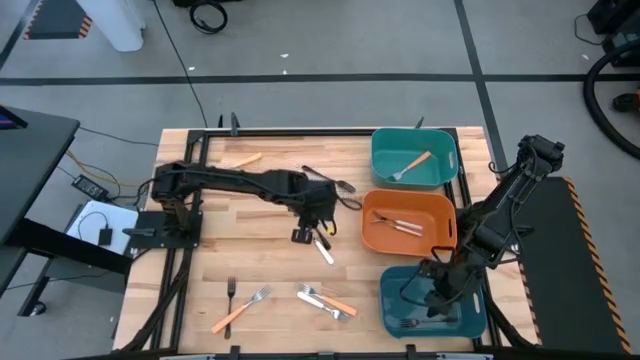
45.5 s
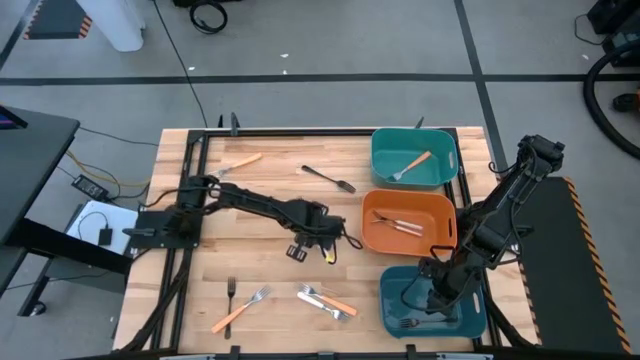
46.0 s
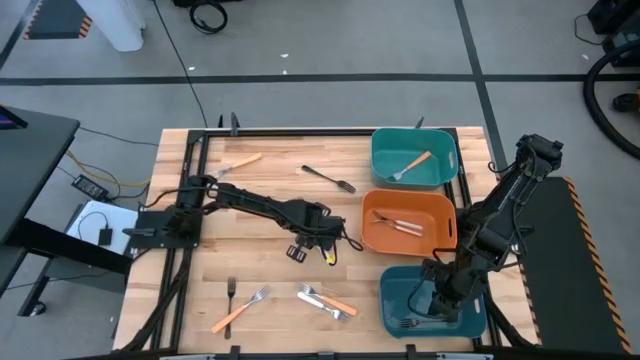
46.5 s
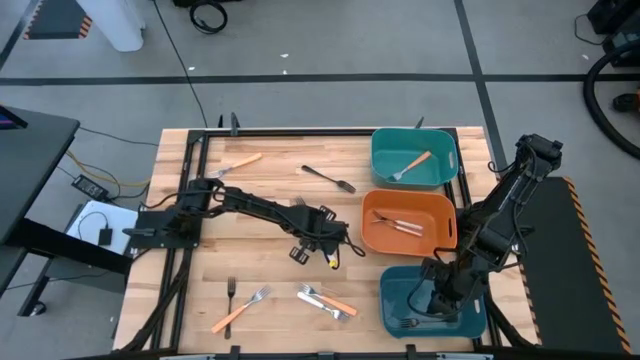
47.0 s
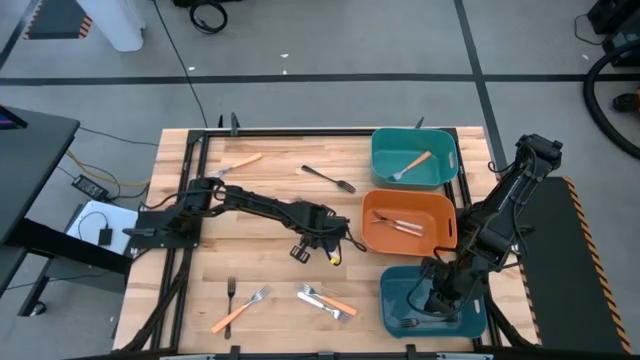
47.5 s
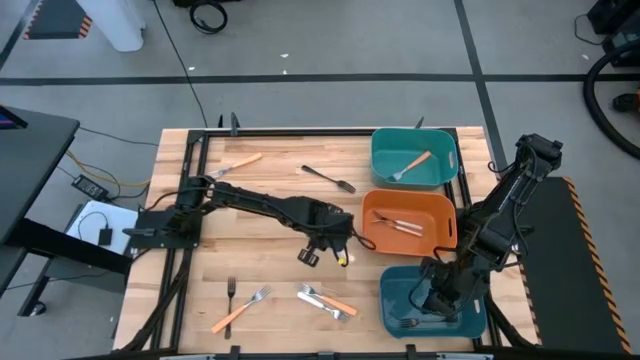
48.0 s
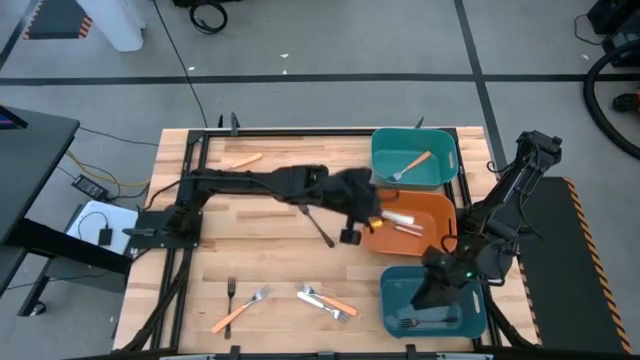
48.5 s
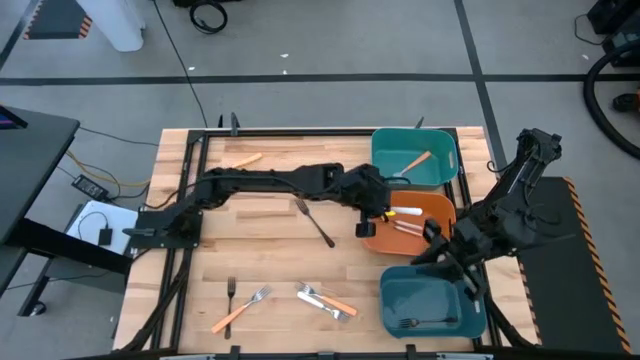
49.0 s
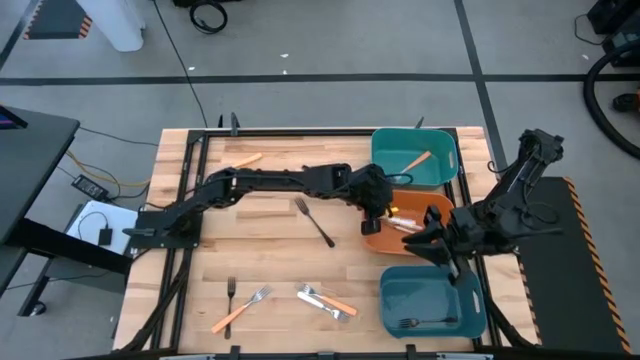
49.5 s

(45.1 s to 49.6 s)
Task: Sort silverware by color (type)
Put the white fork into the orange bin

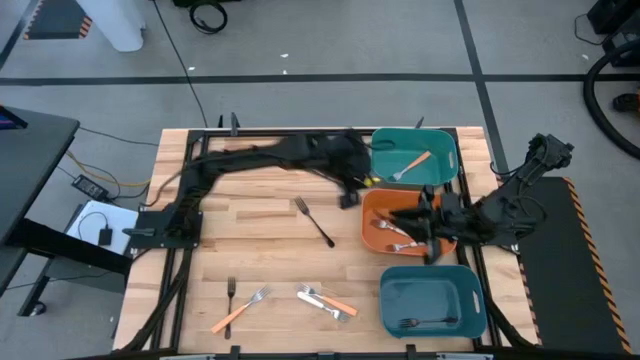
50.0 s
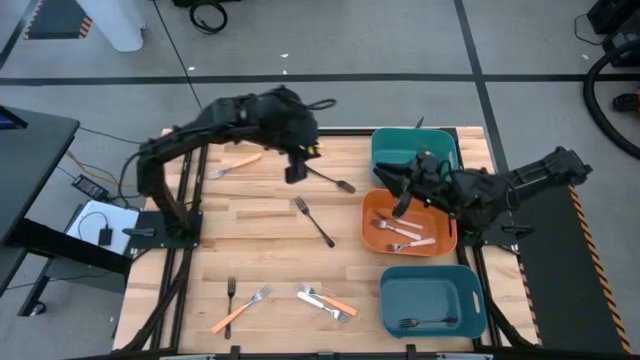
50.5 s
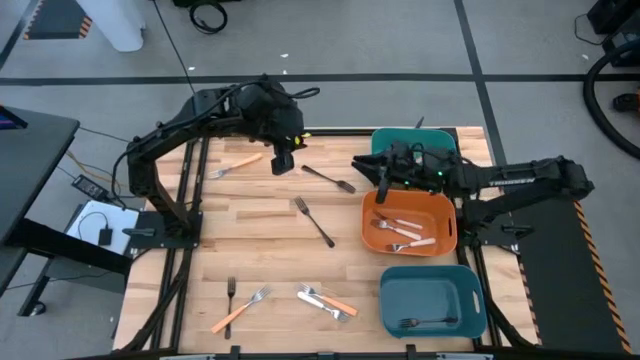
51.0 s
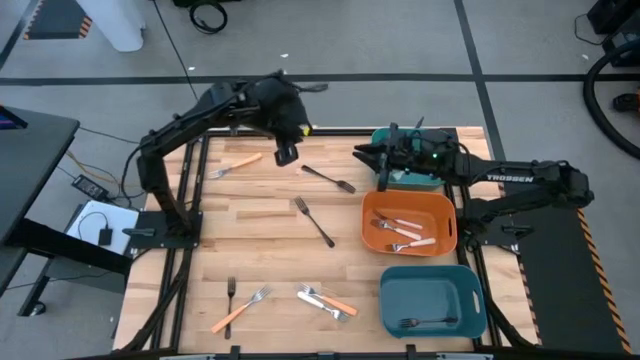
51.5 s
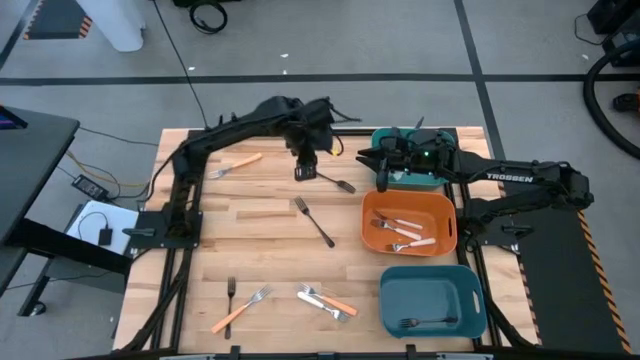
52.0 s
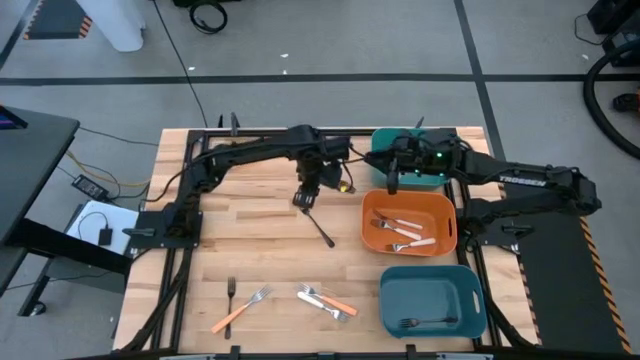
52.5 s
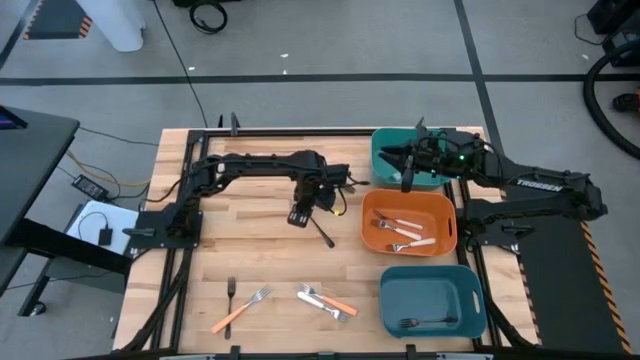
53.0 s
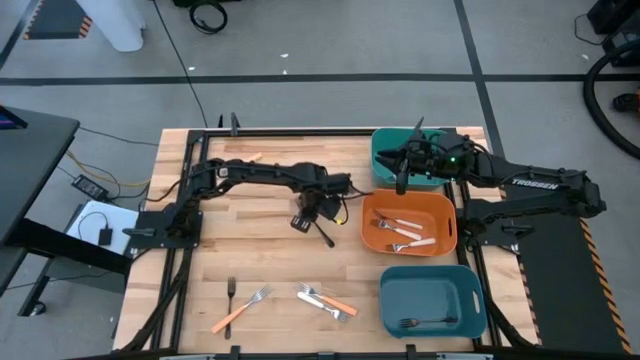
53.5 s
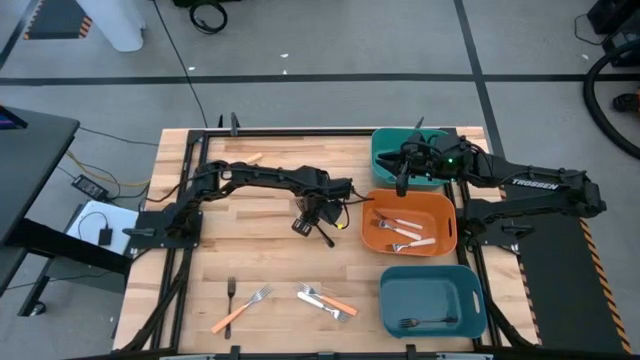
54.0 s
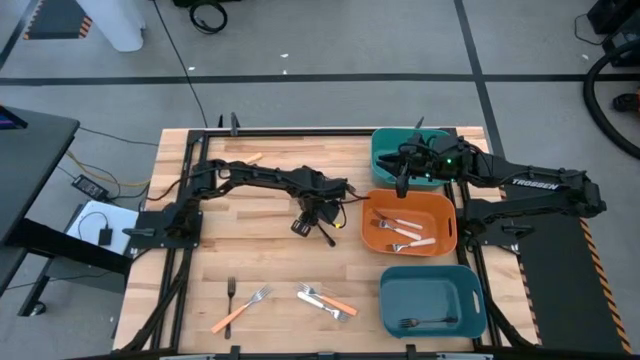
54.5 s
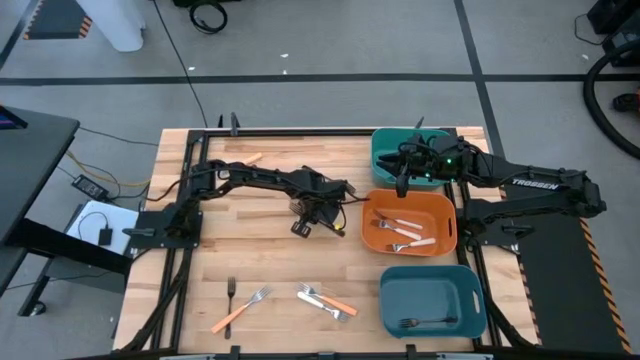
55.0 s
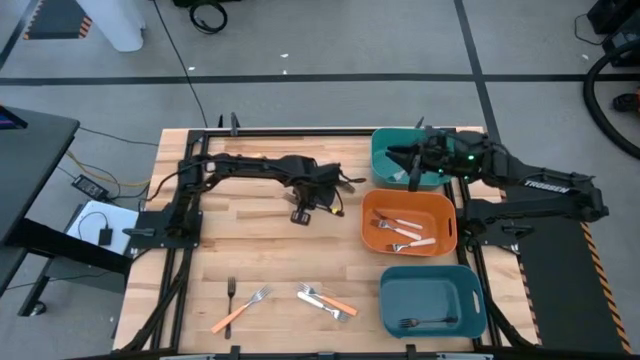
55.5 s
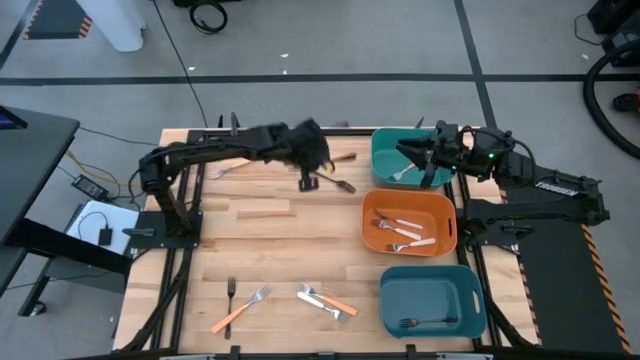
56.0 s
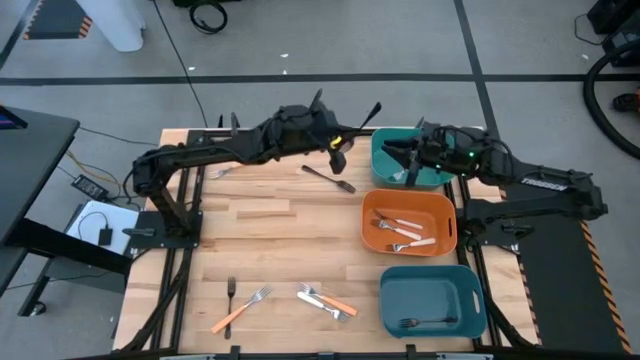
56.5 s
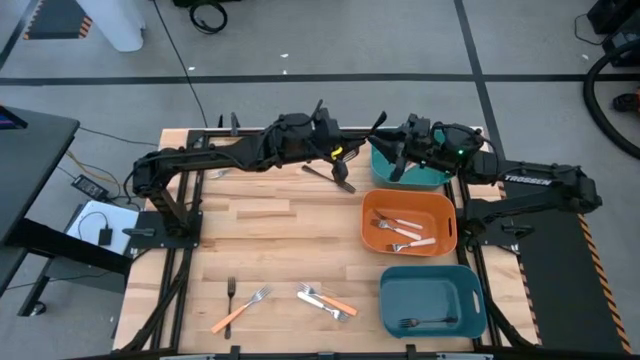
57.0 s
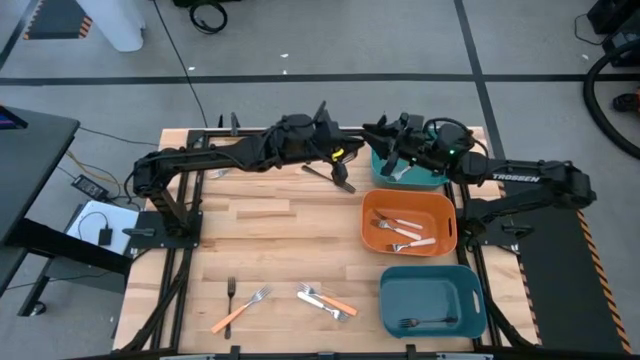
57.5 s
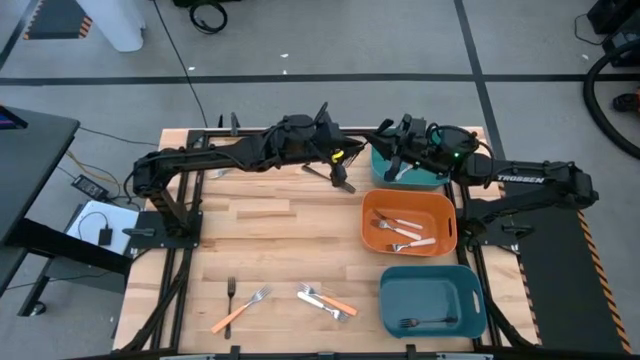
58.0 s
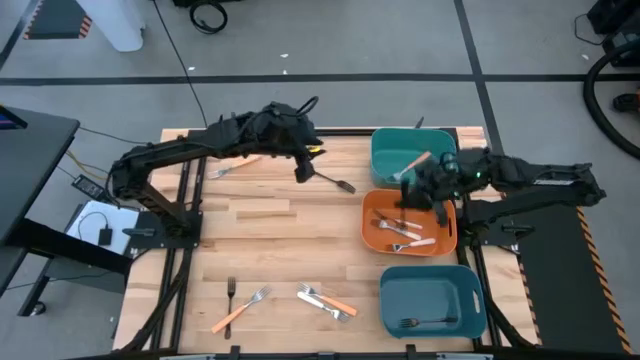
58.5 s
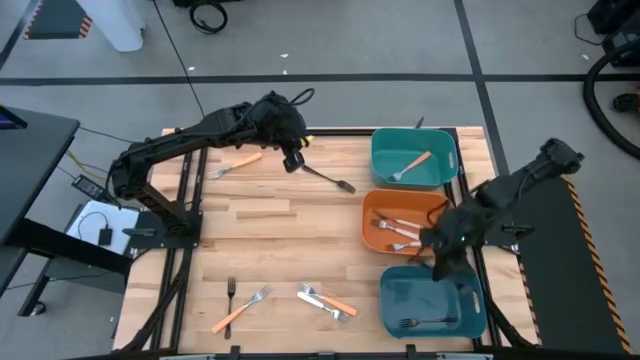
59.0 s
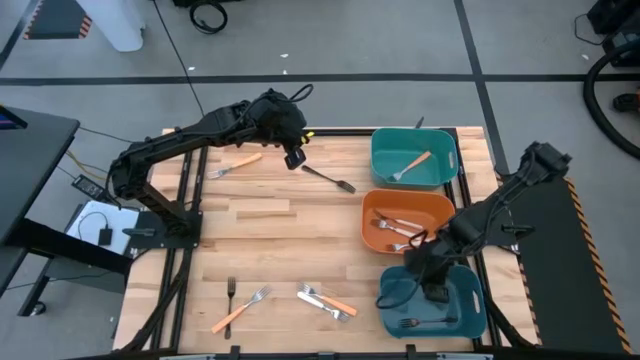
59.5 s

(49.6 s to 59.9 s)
Put the black fork into the blue bin

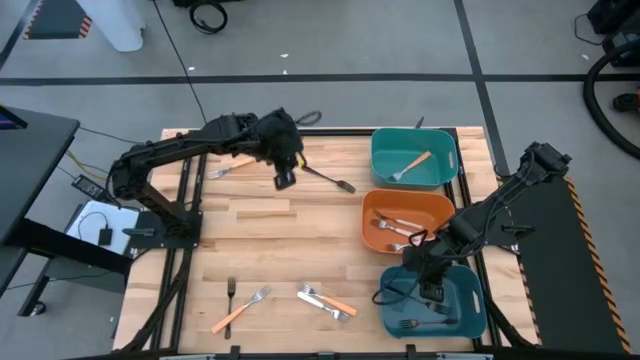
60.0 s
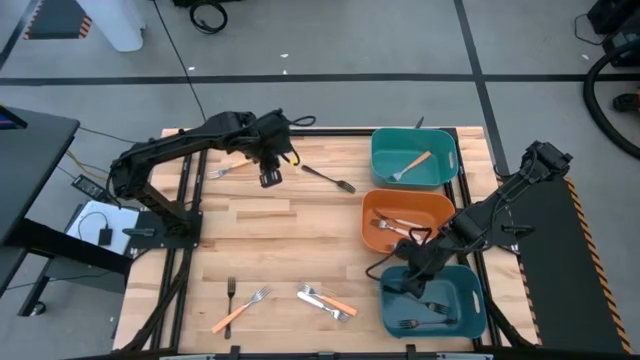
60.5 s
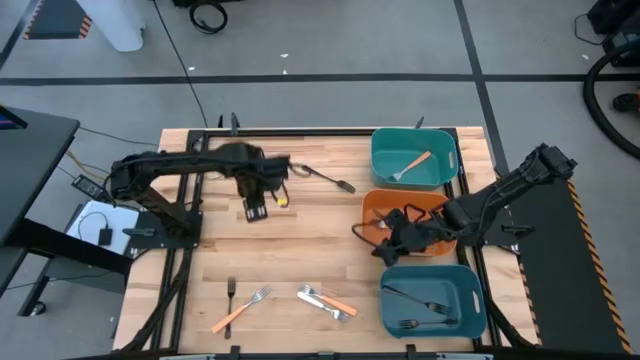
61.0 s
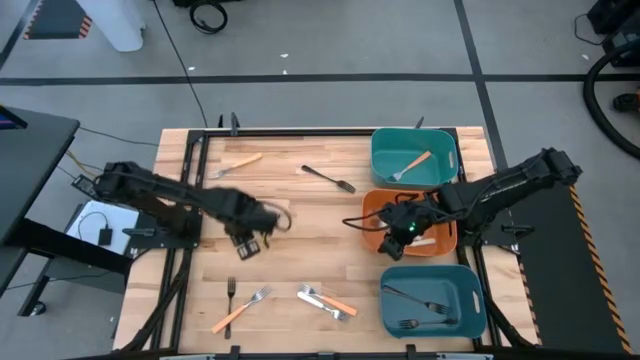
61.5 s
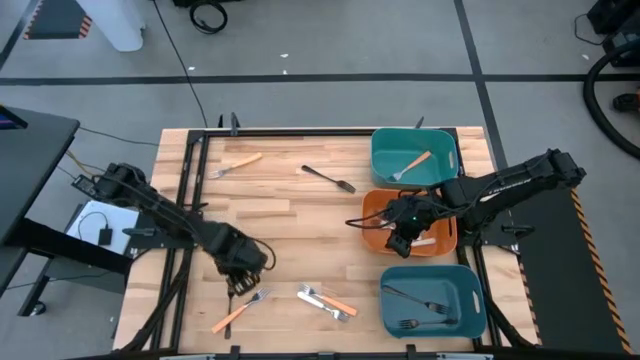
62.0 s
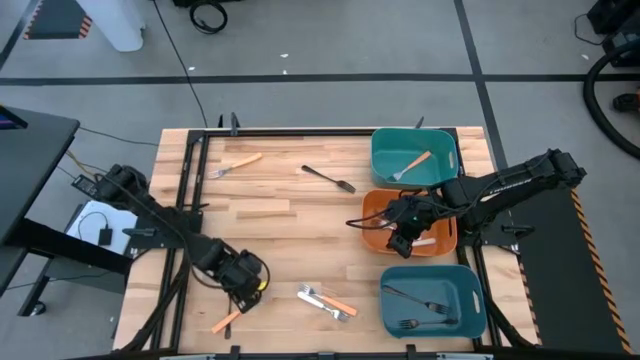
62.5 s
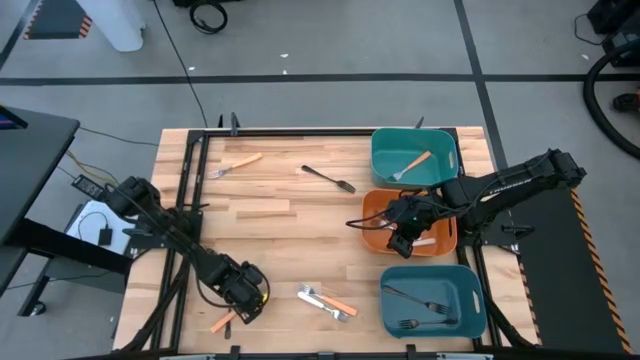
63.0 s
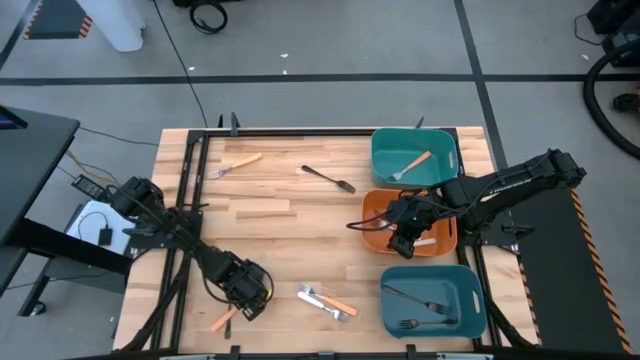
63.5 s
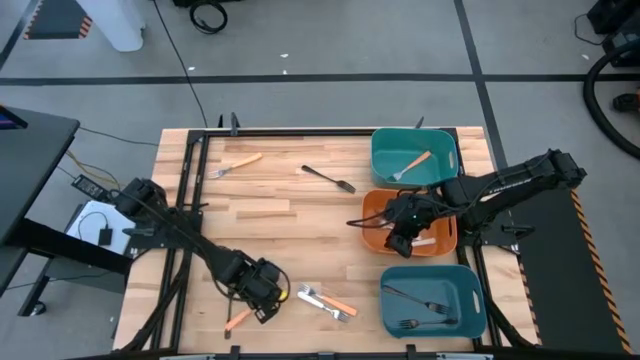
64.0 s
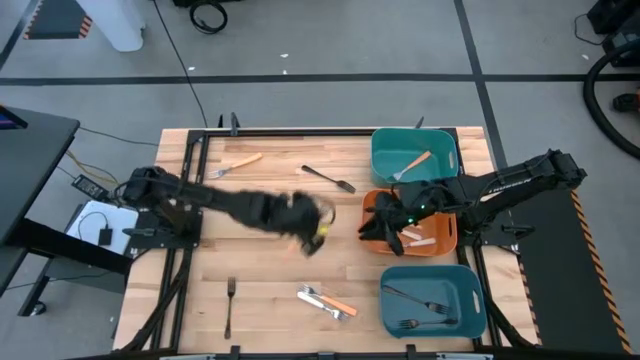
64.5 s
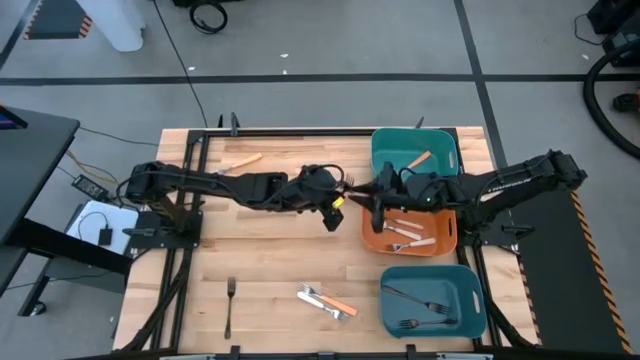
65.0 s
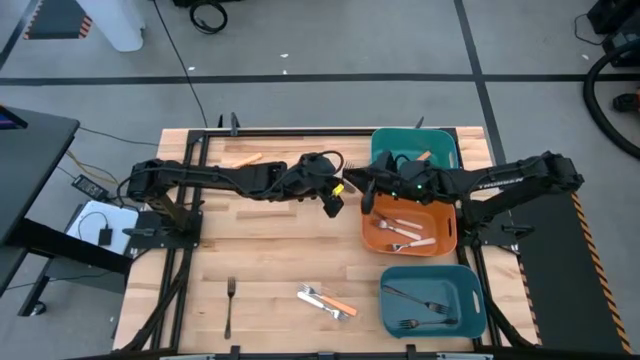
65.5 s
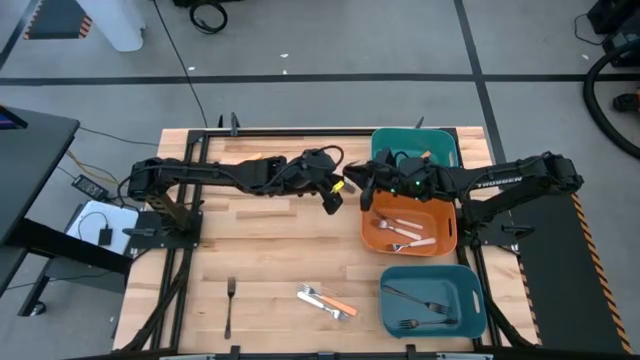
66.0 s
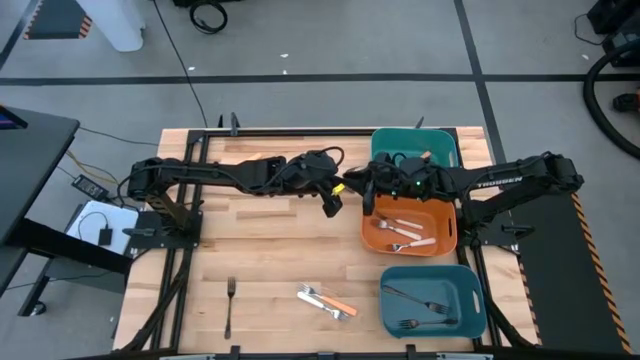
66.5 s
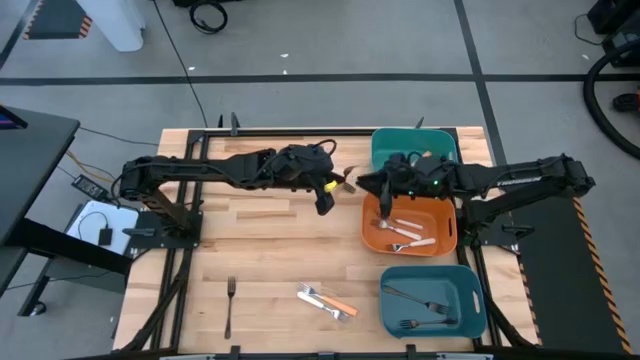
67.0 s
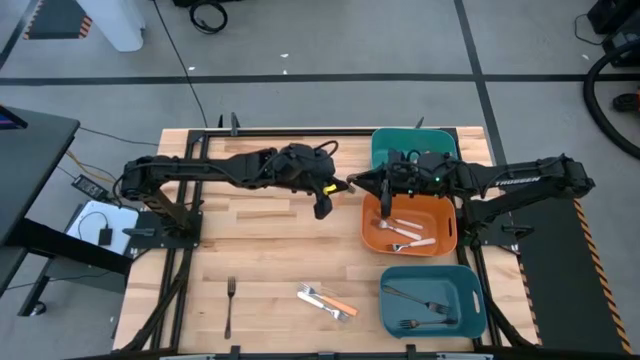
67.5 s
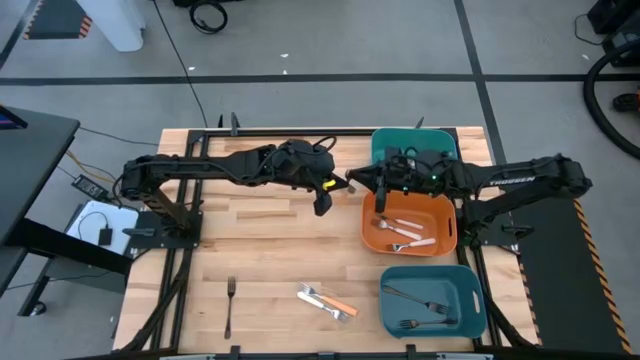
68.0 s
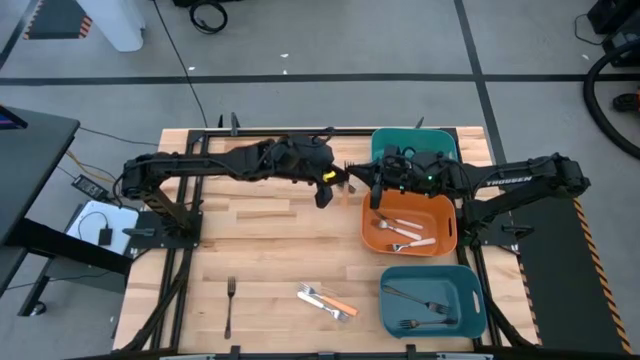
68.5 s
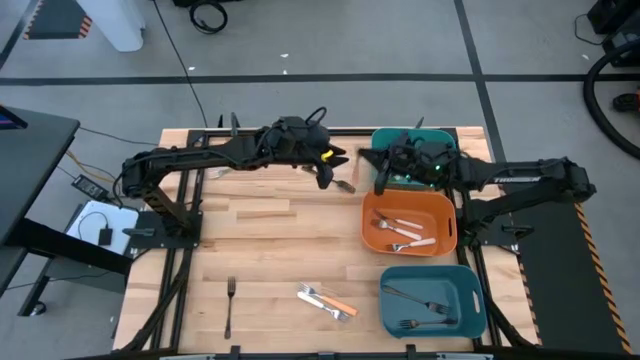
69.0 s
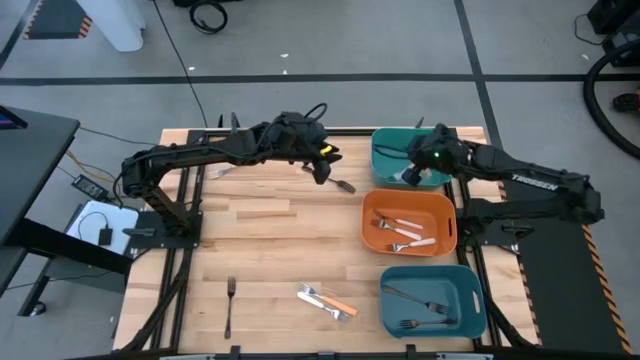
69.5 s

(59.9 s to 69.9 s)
Put the orange fork into the green bin
